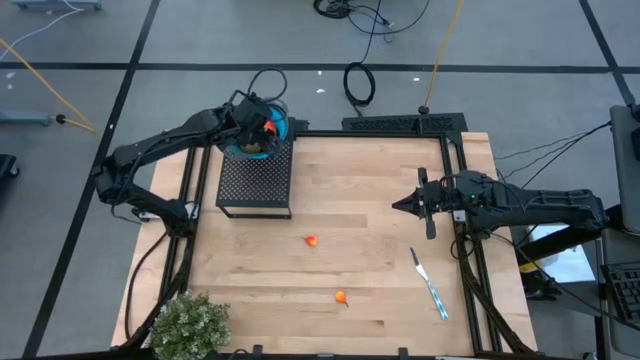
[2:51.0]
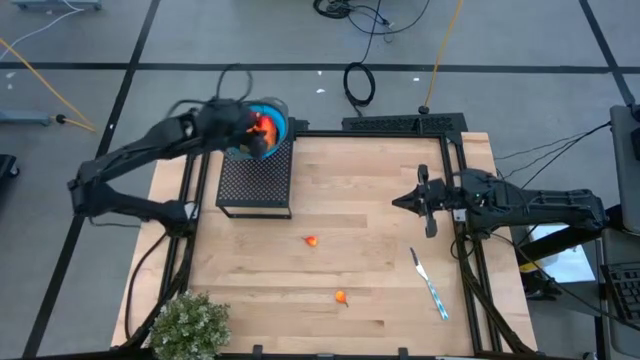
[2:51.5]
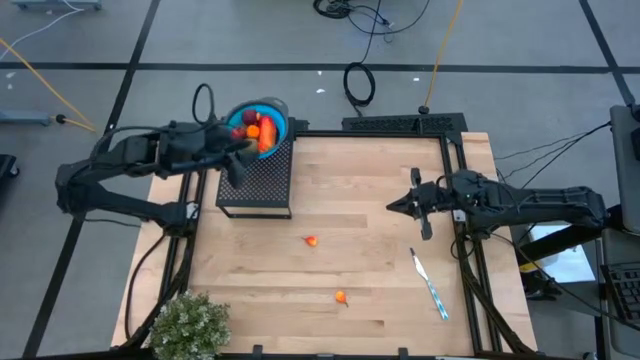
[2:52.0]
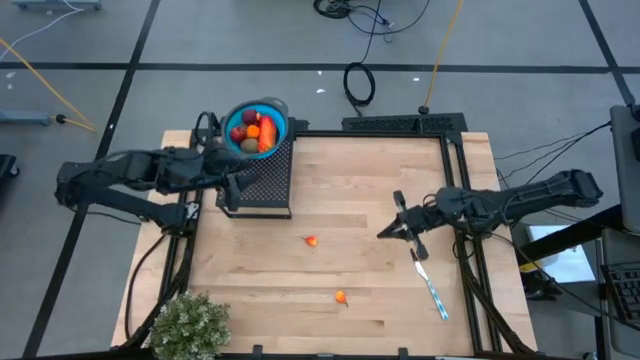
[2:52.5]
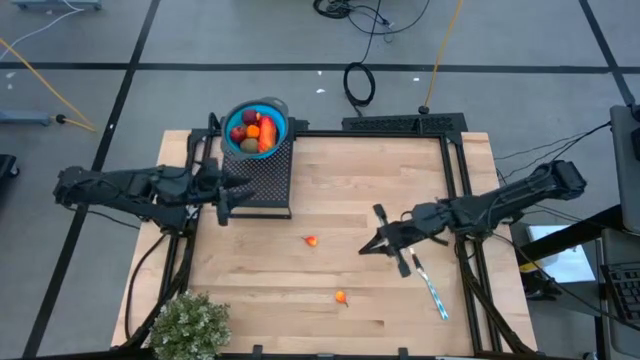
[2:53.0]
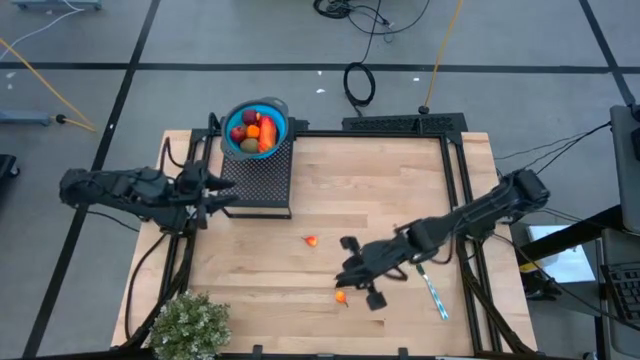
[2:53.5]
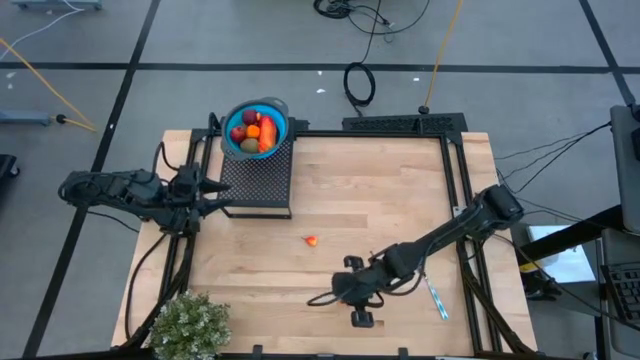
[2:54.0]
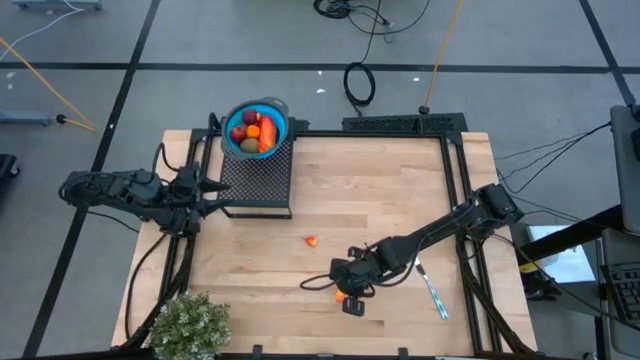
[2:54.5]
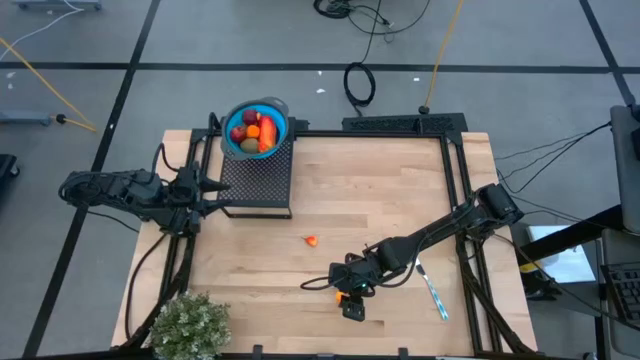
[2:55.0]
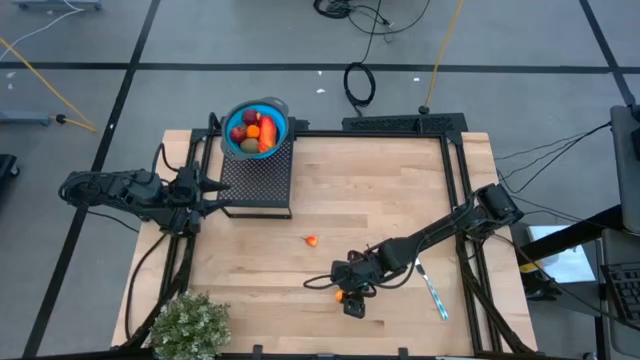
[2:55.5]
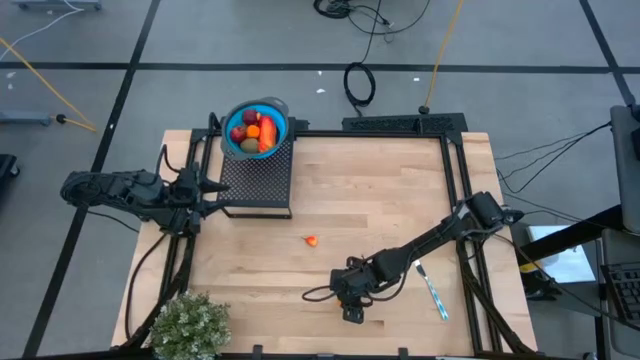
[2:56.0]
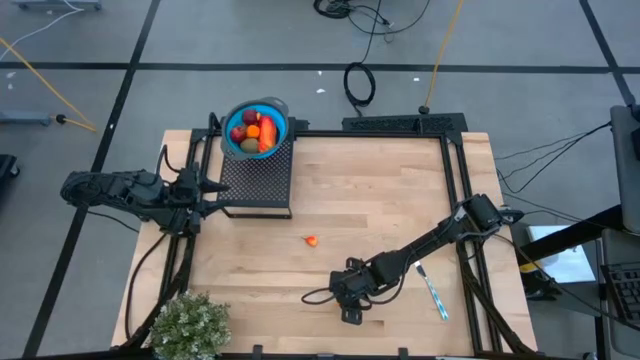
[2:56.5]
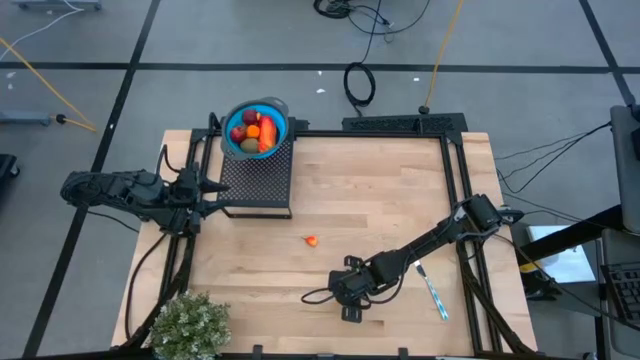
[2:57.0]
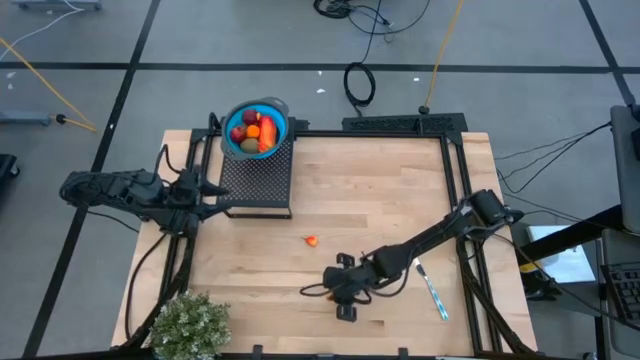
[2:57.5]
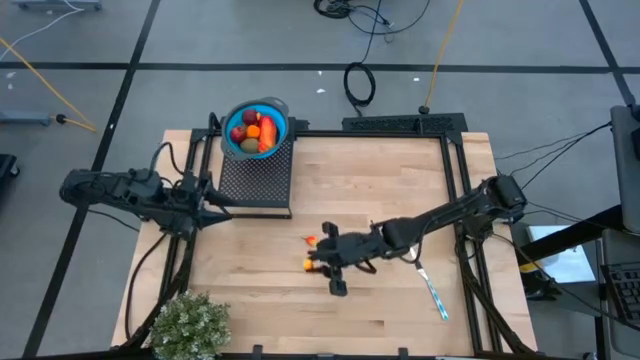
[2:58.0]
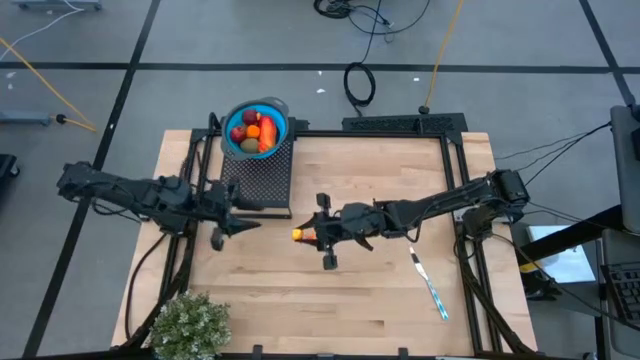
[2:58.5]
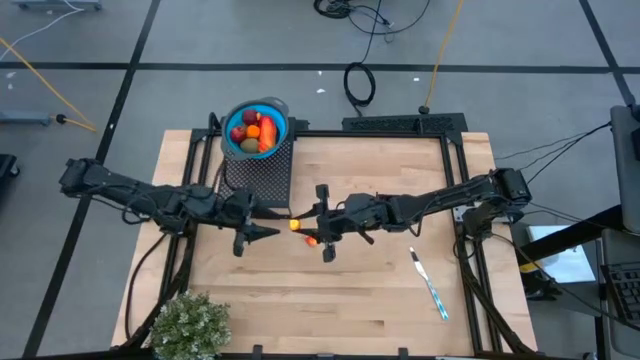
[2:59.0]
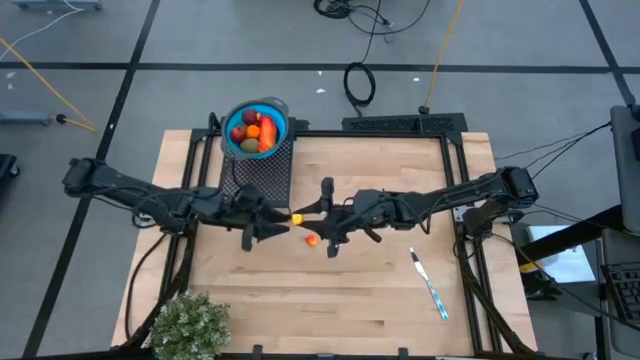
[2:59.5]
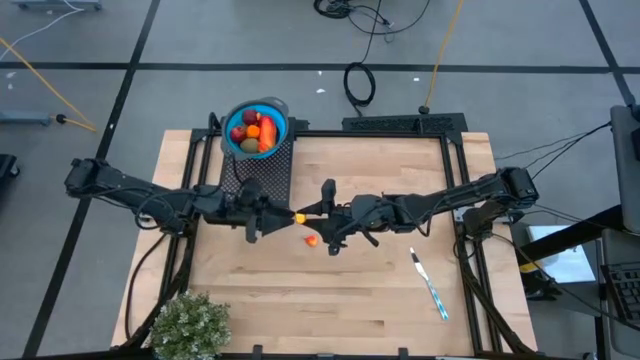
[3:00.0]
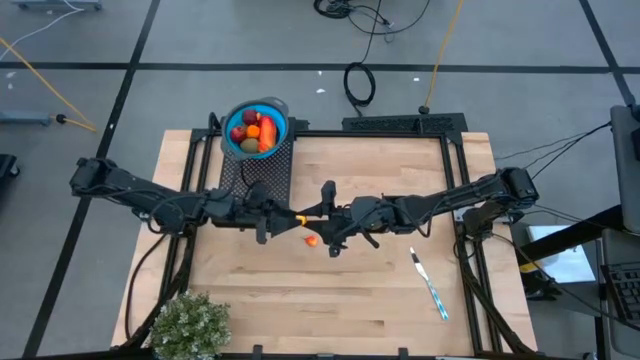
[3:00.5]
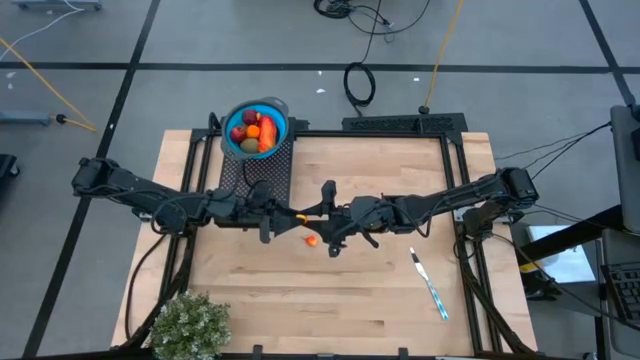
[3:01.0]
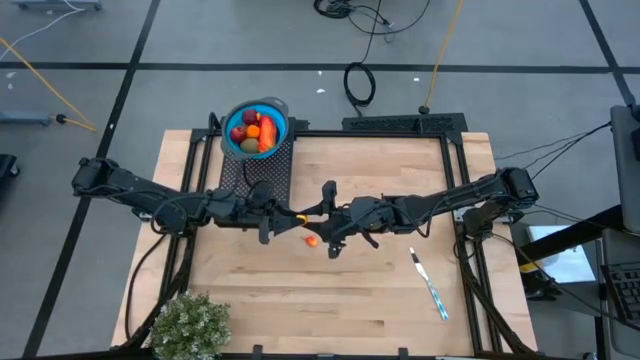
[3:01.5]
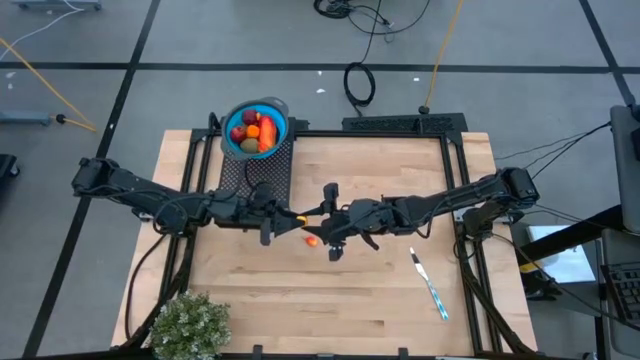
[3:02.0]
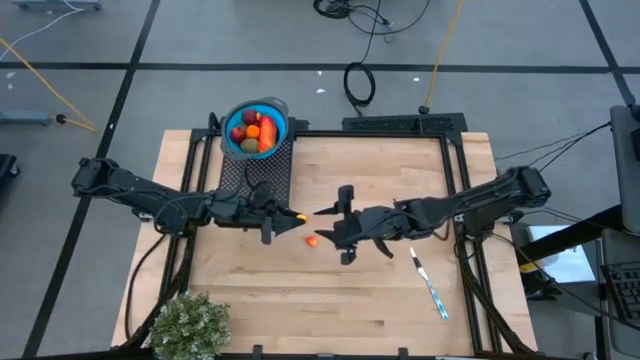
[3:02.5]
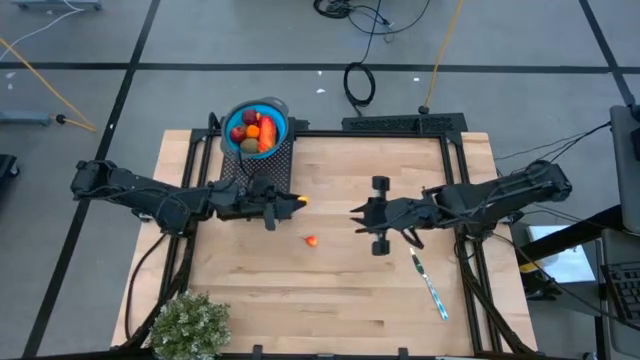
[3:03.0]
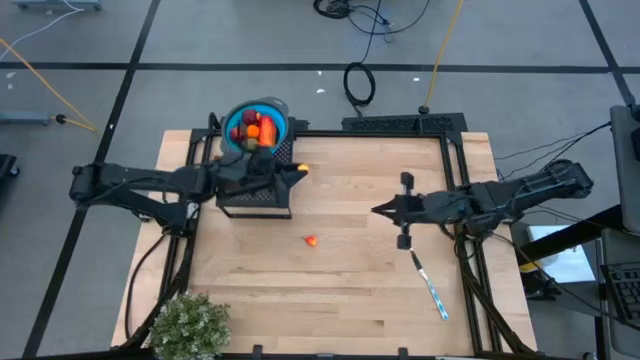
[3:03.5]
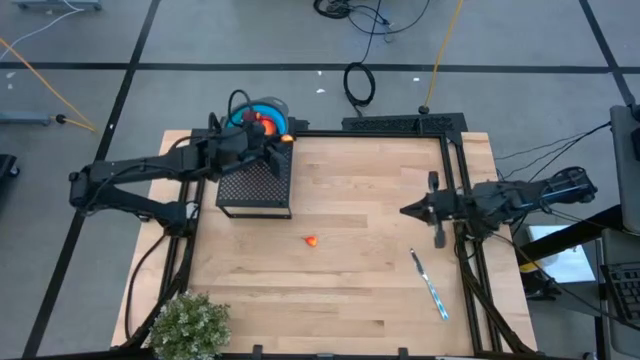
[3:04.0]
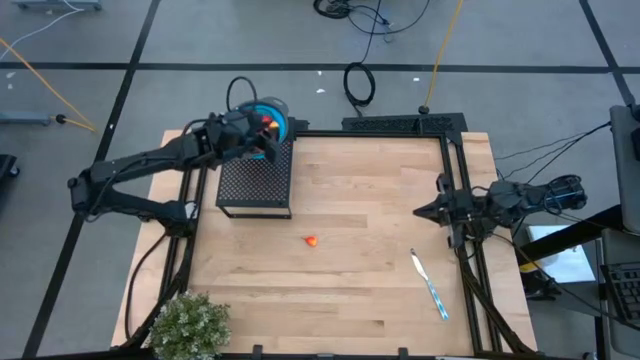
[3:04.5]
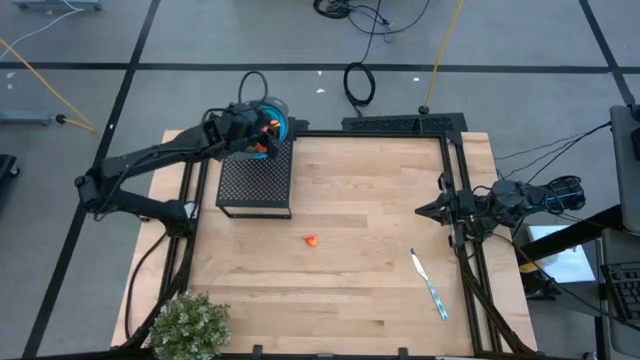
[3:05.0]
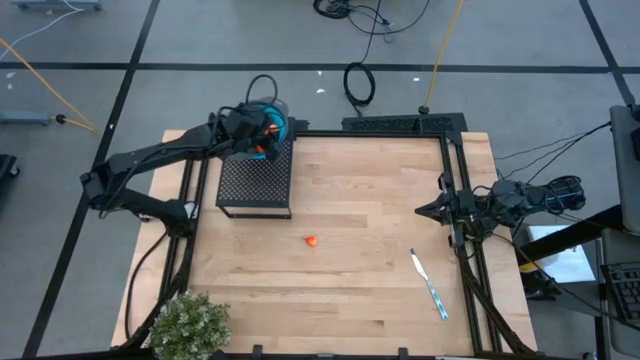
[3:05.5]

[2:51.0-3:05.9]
Task: Pick & Place Fruit
Put the peach into the blue strainer bowl on the shelf
